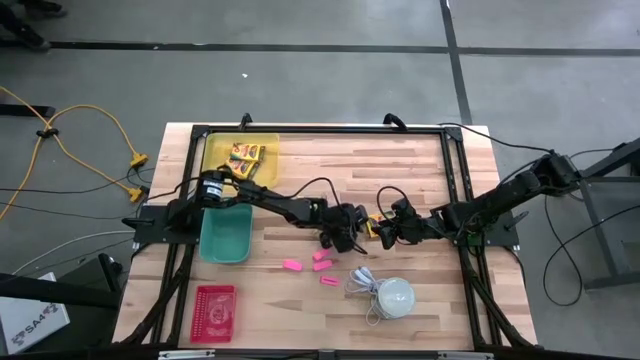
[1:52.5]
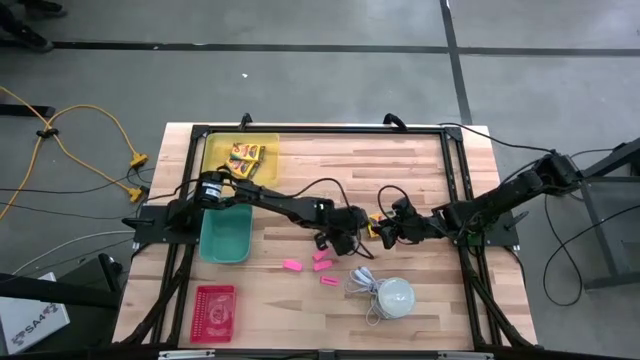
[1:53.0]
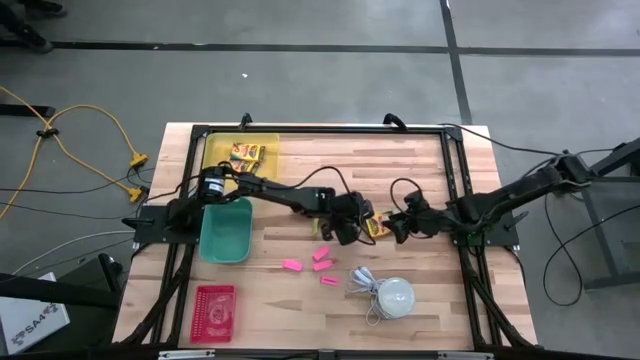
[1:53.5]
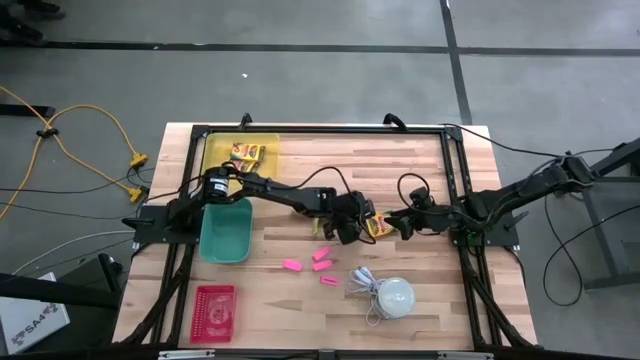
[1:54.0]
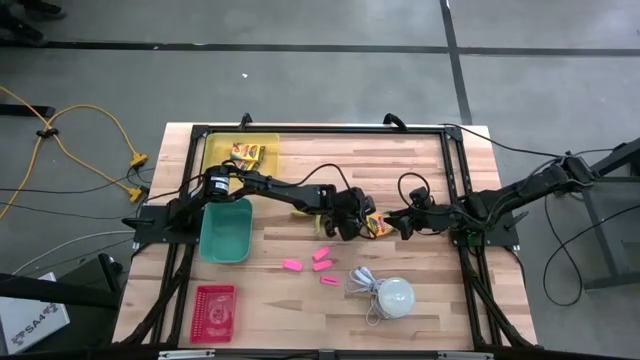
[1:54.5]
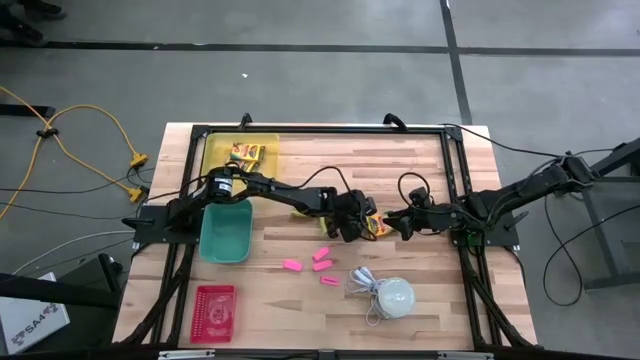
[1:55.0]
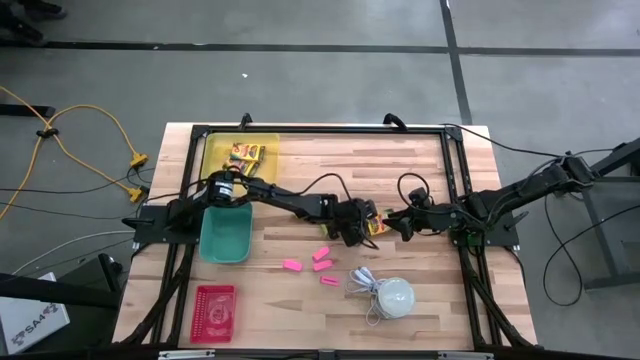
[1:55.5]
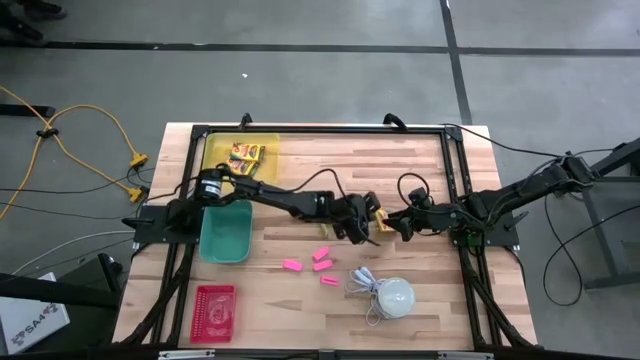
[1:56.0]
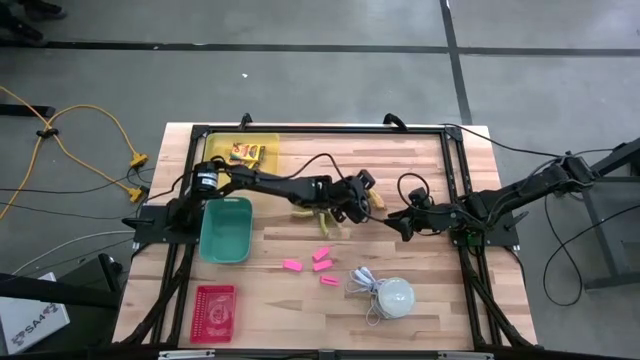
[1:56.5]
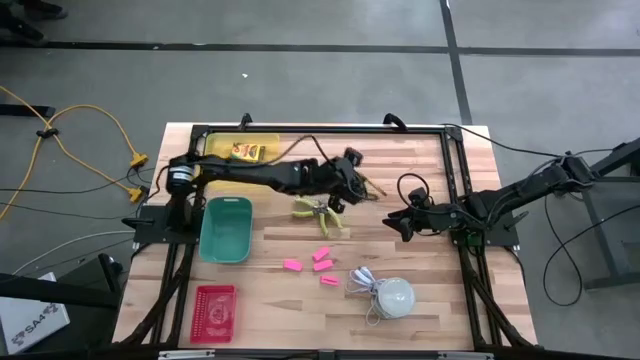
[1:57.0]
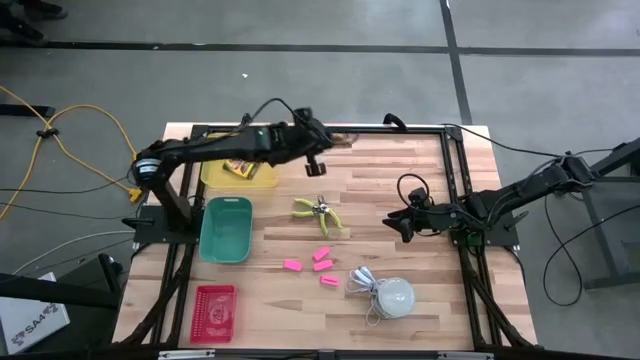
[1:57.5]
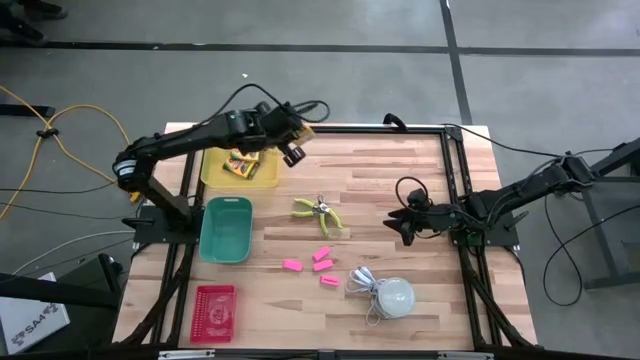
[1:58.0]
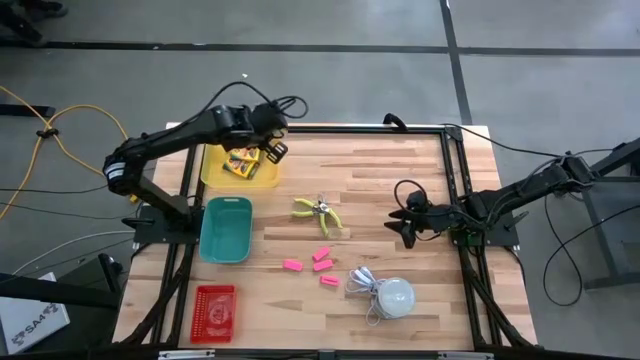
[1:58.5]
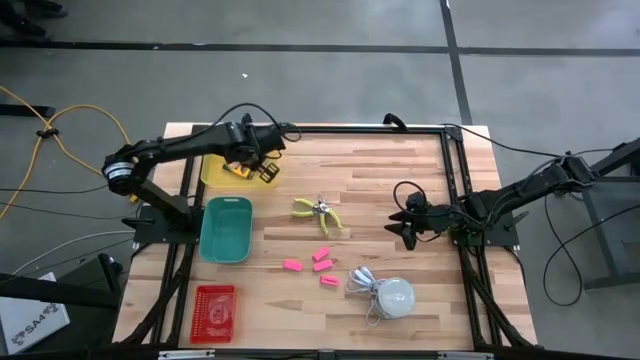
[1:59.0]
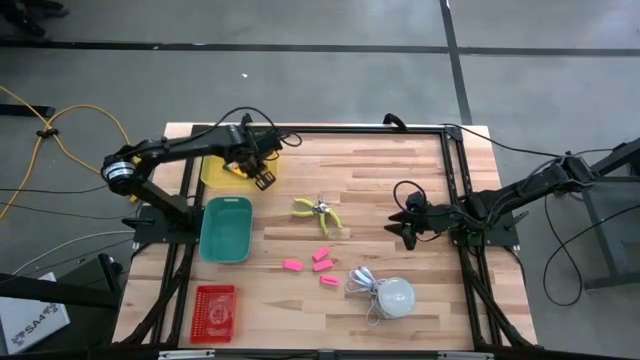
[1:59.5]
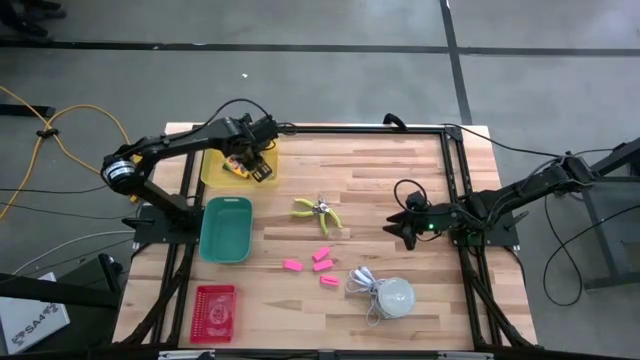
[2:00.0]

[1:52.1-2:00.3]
Task: Pick & Place School Supplies
Put the yellow crayon box into the yellow bin

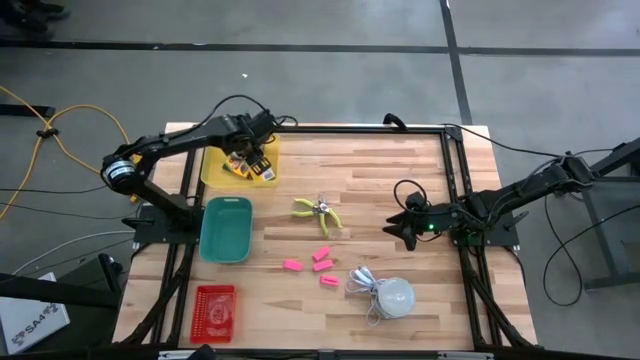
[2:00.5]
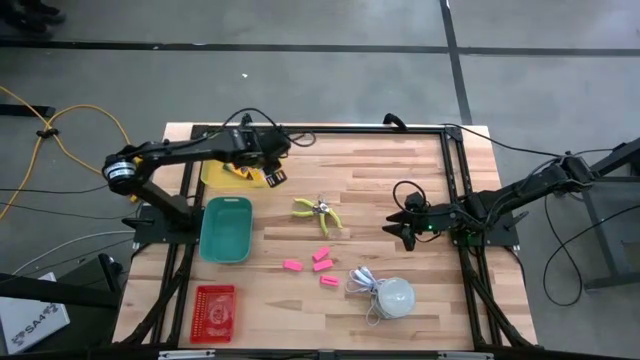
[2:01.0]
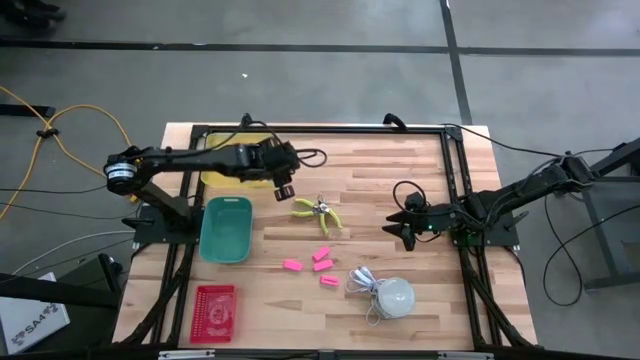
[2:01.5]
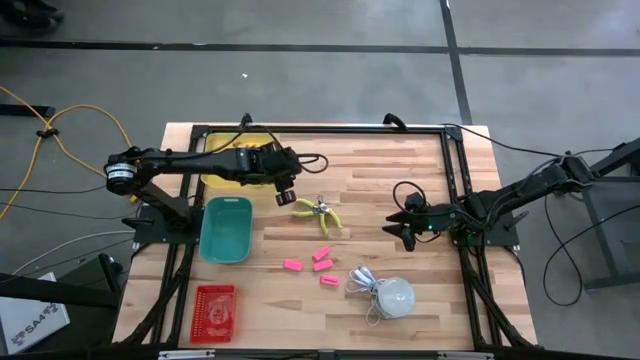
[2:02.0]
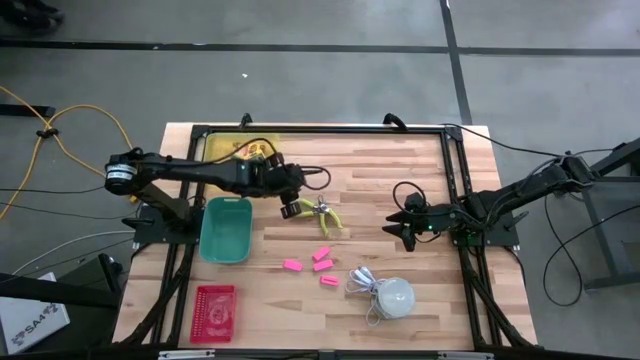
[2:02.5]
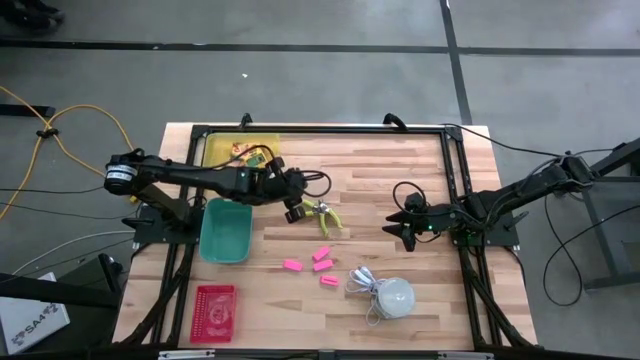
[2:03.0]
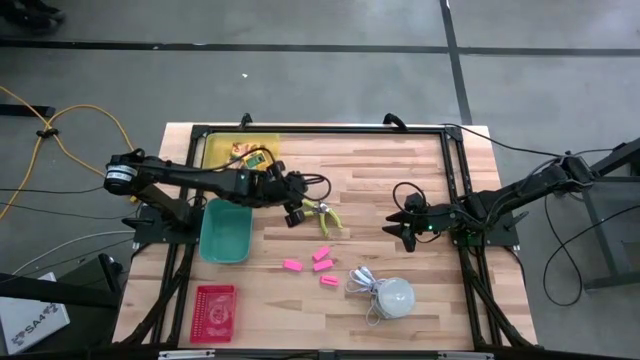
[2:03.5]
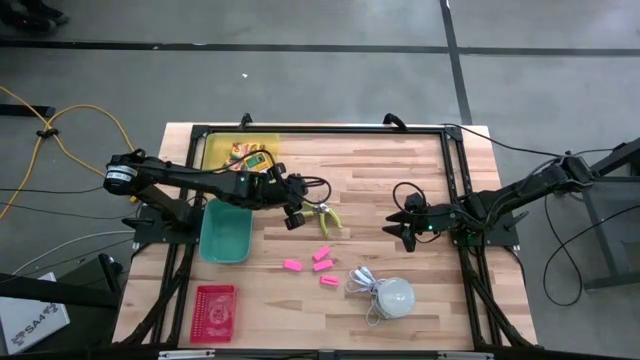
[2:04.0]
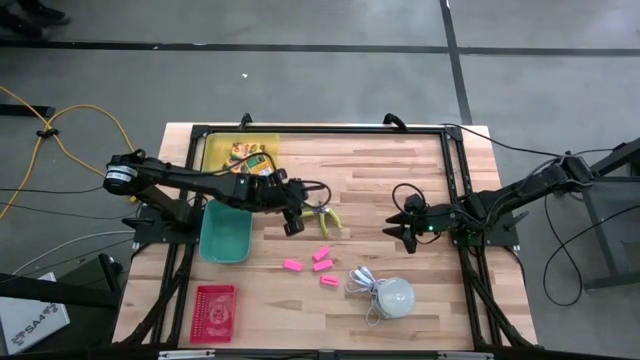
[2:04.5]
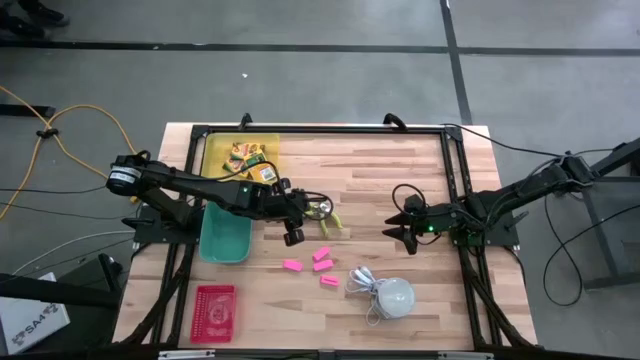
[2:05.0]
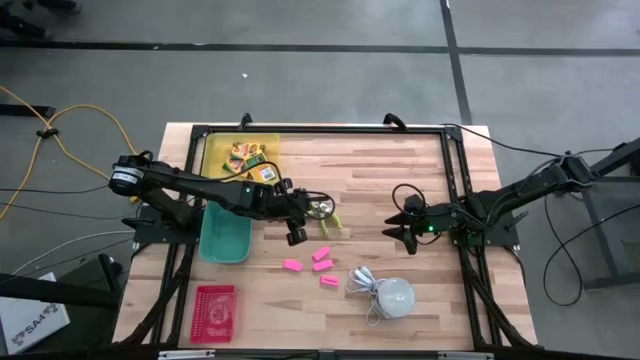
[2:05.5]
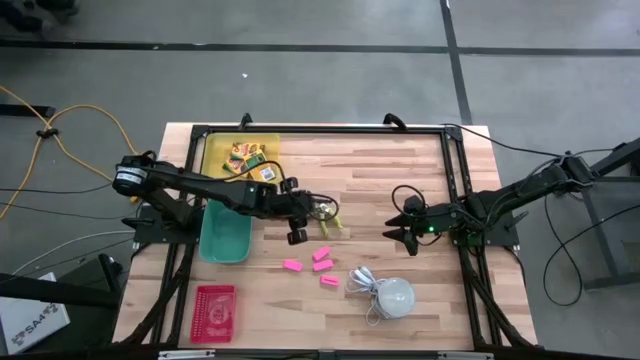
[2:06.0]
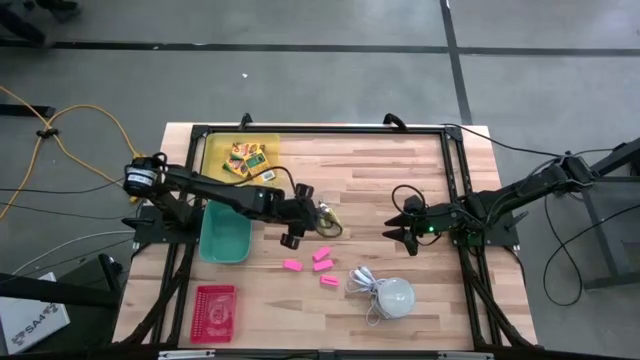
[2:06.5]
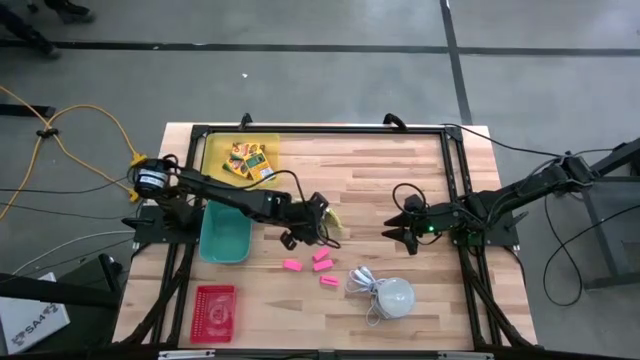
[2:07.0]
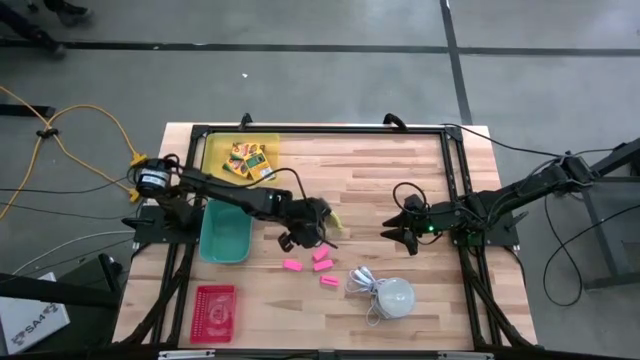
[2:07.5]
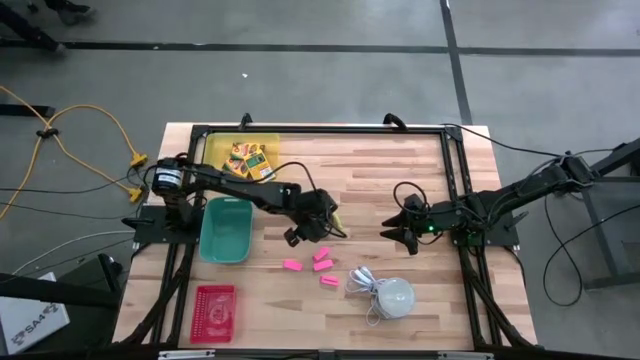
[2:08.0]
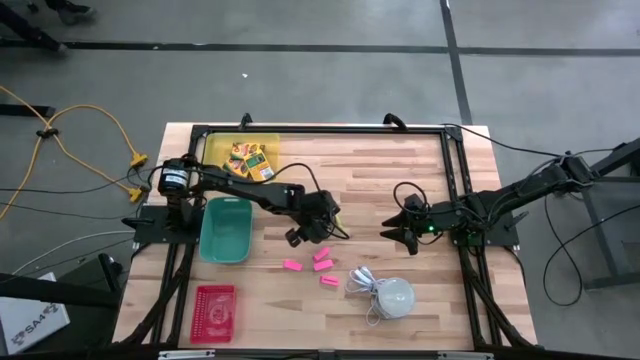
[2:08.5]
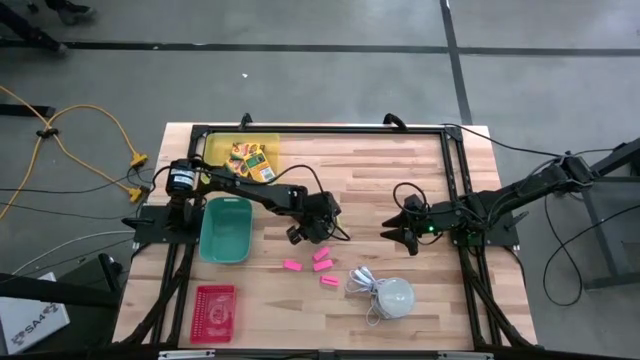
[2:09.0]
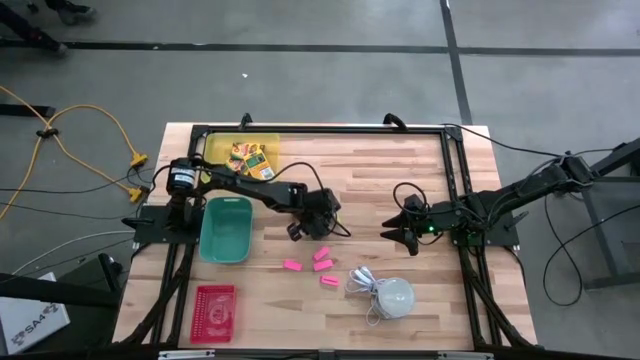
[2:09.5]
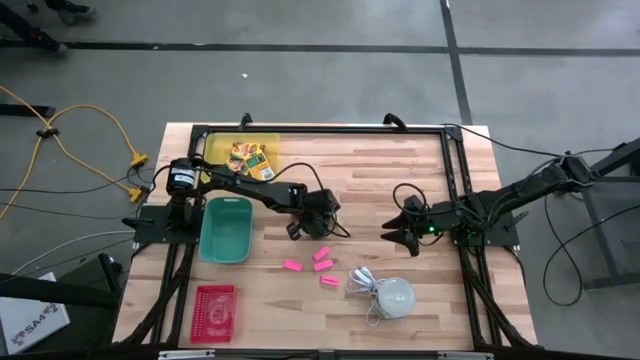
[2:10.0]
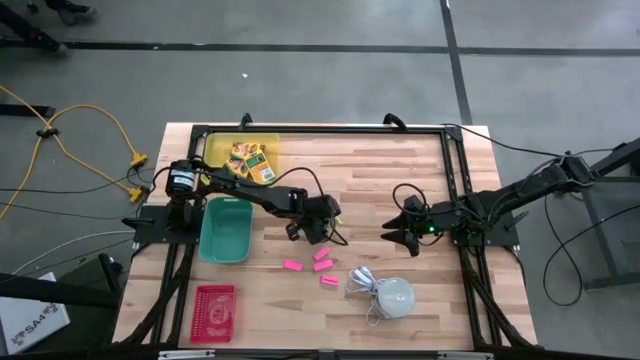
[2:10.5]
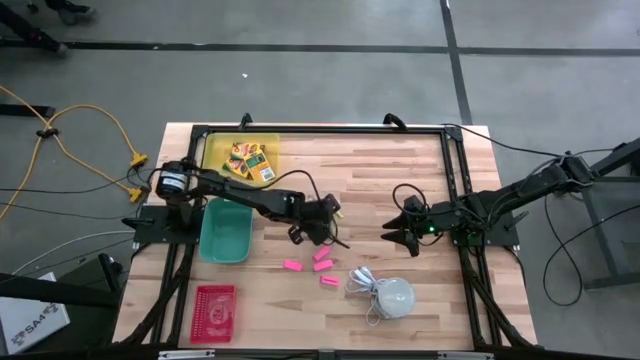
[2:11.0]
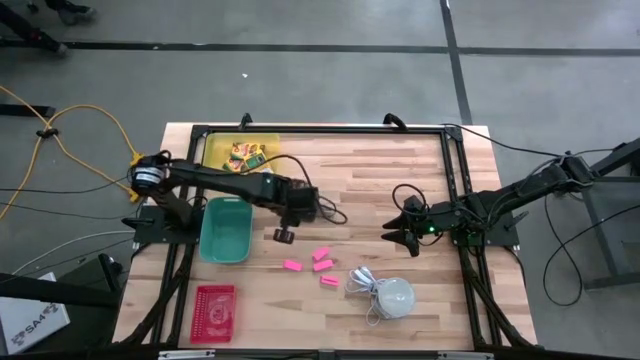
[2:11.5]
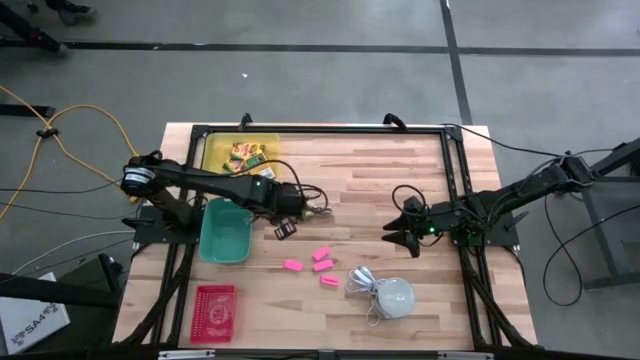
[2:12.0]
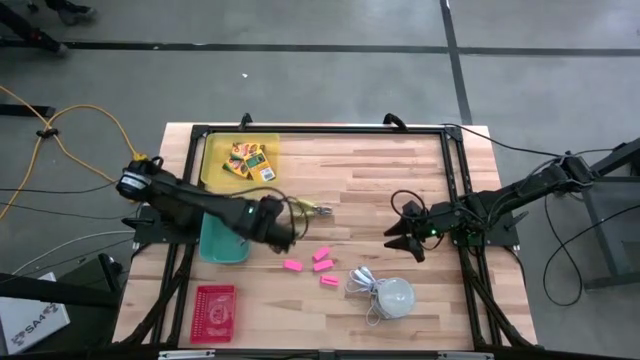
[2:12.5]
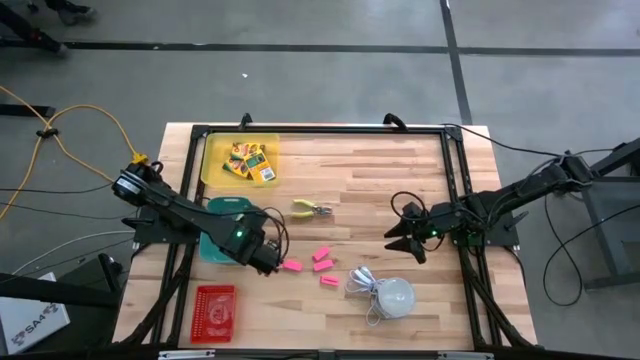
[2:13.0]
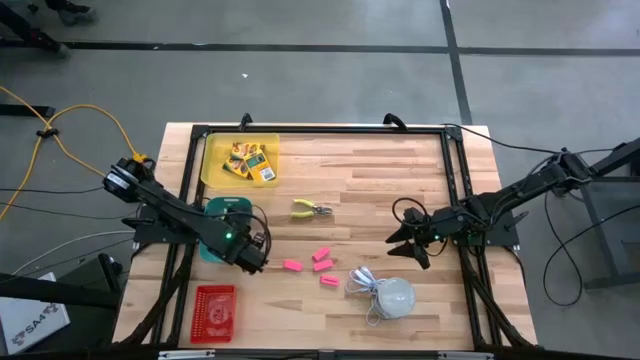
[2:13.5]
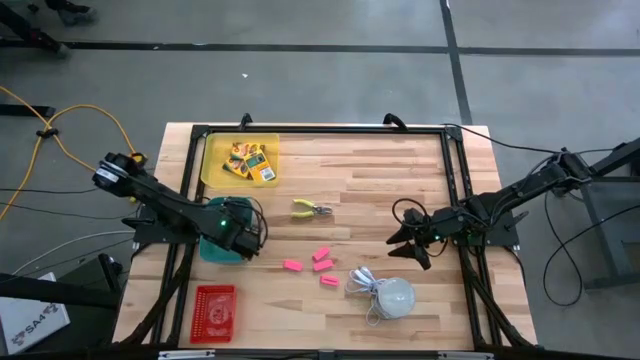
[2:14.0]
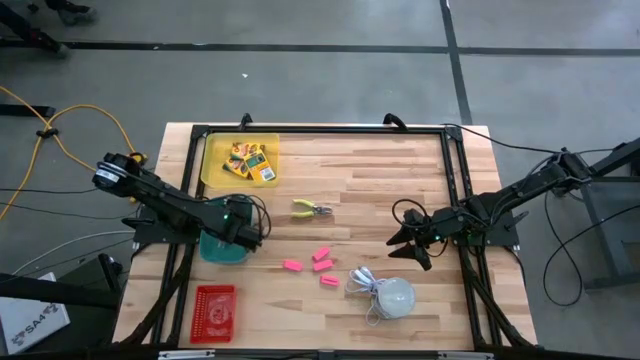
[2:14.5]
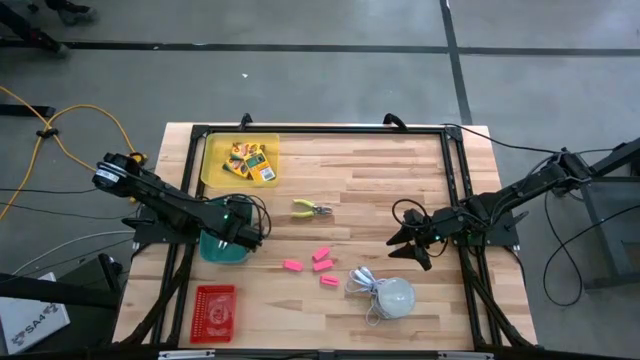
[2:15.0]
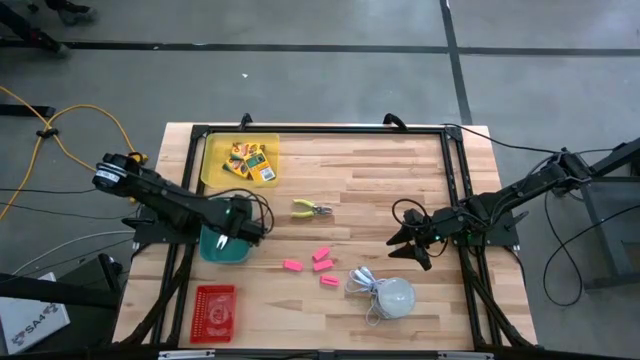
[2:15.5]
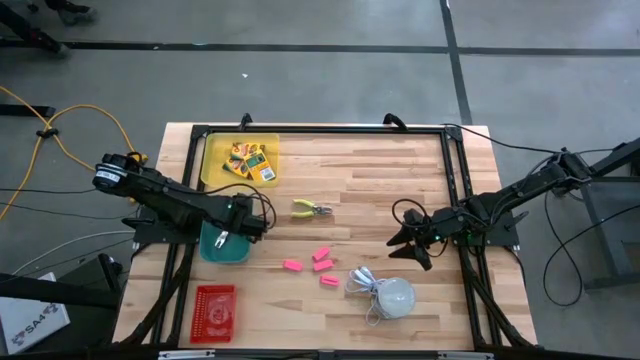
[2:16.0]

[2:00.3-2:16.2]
Put the right green puncher into the green bin
